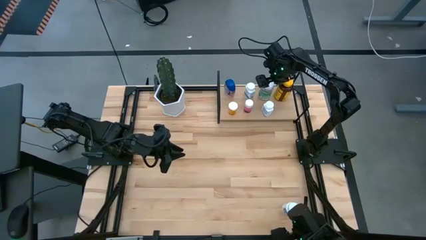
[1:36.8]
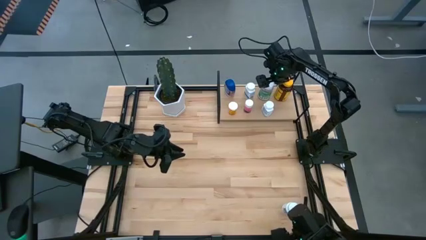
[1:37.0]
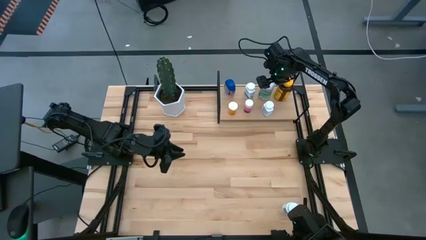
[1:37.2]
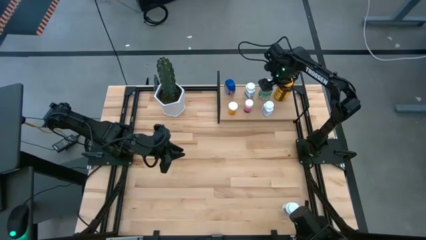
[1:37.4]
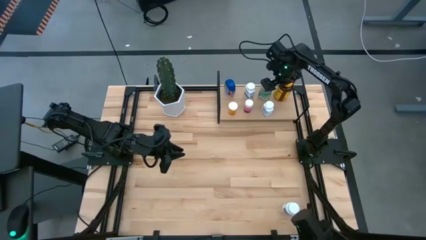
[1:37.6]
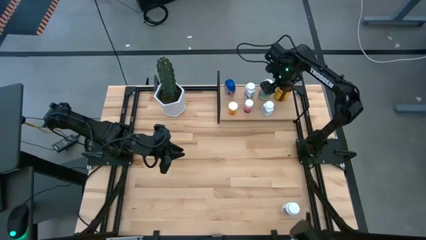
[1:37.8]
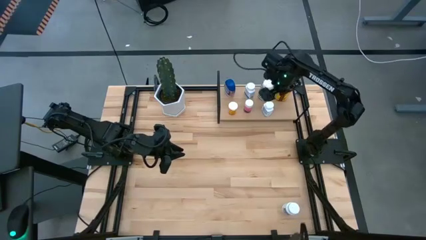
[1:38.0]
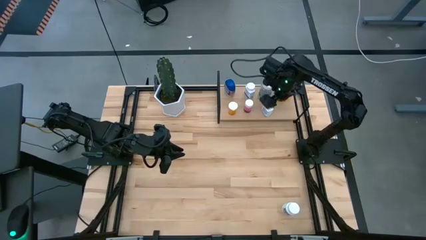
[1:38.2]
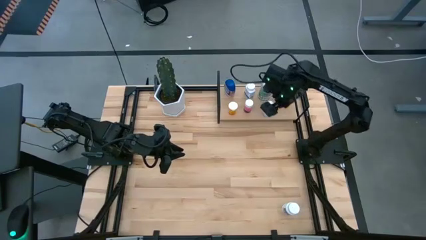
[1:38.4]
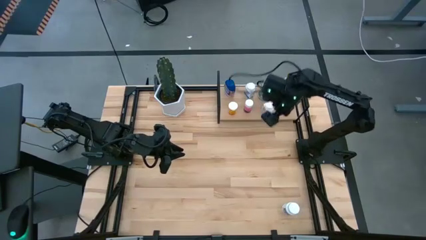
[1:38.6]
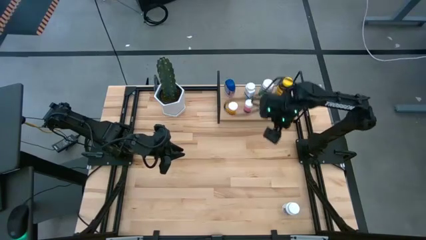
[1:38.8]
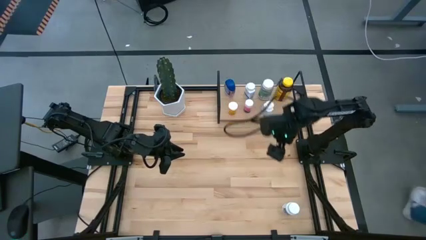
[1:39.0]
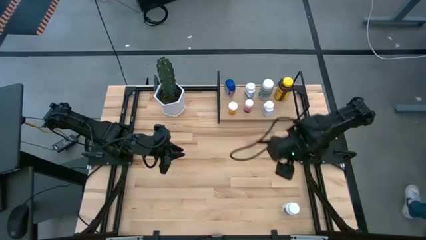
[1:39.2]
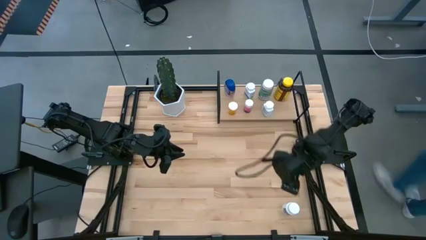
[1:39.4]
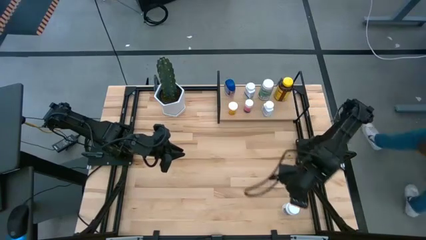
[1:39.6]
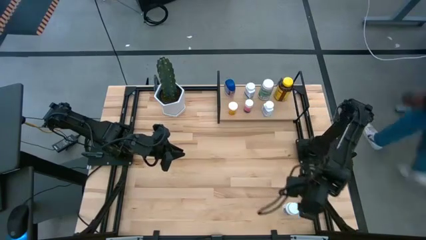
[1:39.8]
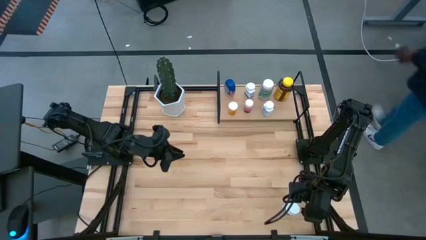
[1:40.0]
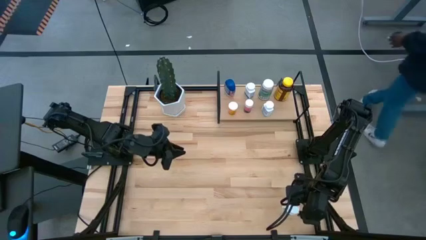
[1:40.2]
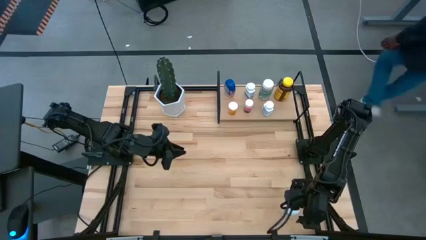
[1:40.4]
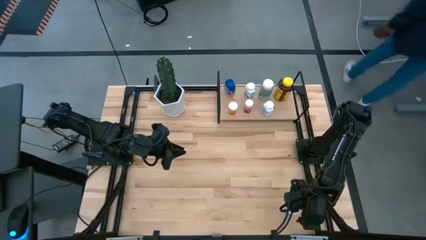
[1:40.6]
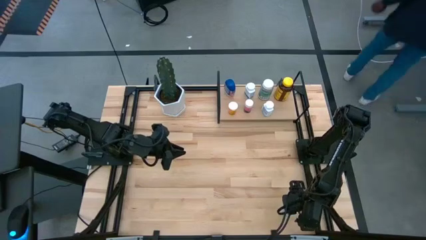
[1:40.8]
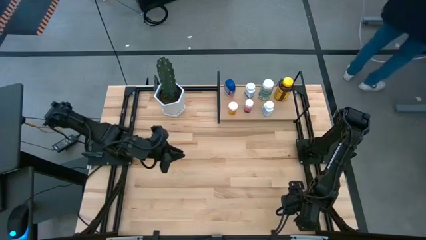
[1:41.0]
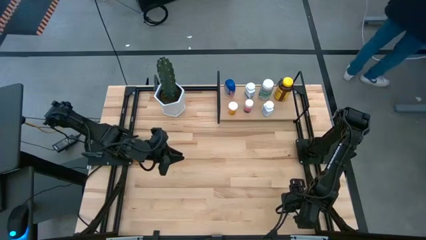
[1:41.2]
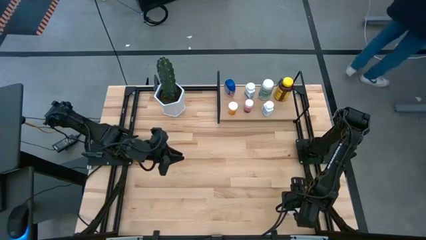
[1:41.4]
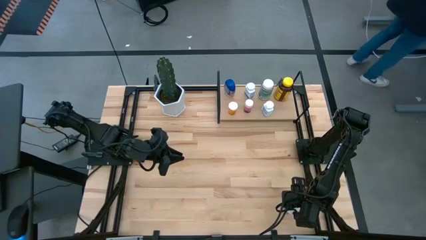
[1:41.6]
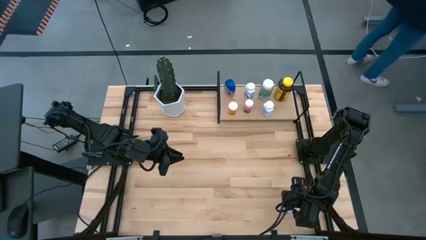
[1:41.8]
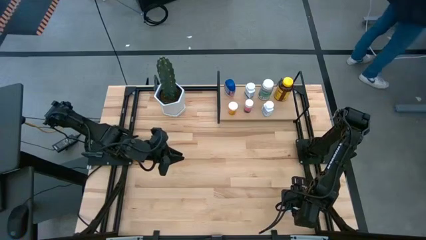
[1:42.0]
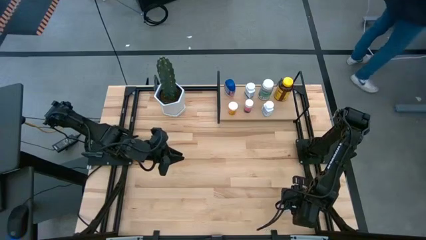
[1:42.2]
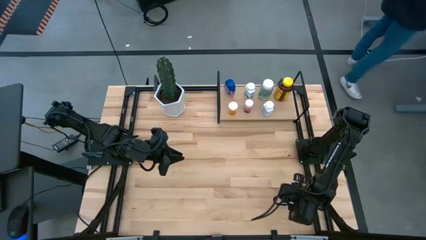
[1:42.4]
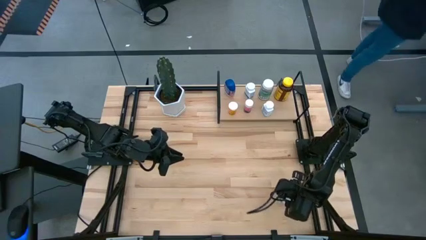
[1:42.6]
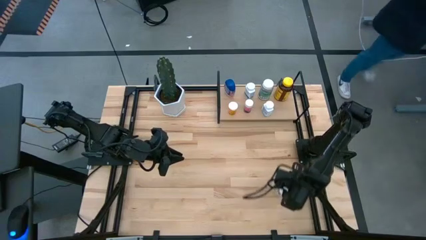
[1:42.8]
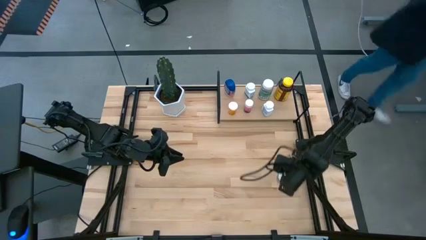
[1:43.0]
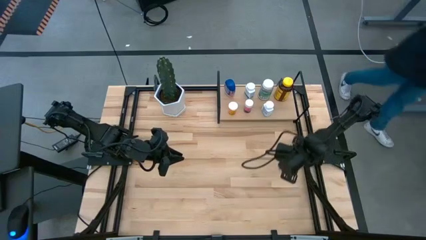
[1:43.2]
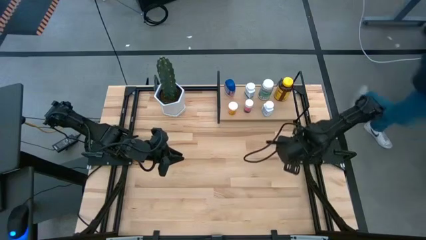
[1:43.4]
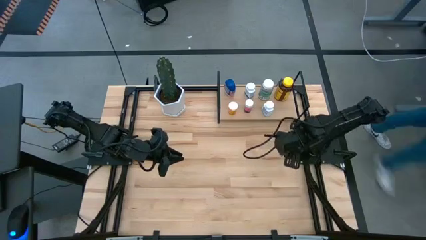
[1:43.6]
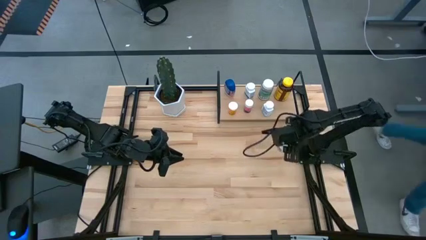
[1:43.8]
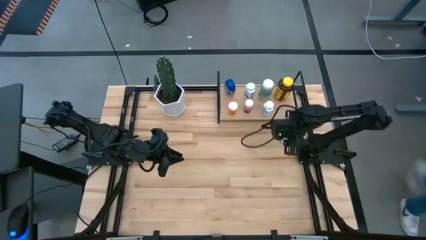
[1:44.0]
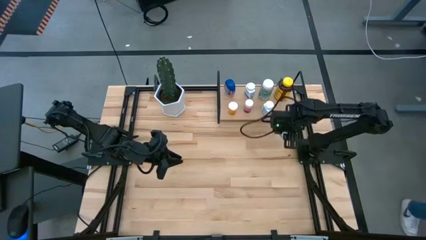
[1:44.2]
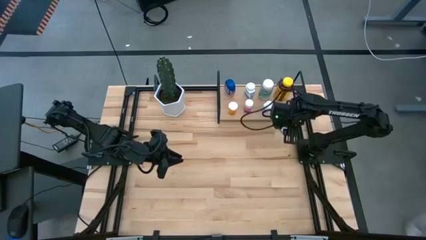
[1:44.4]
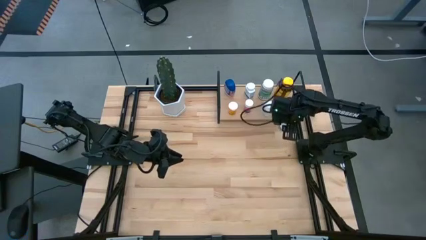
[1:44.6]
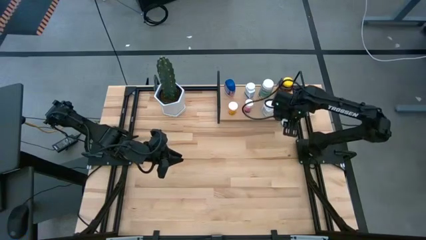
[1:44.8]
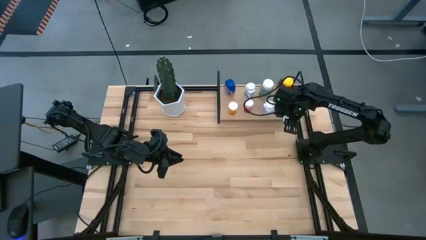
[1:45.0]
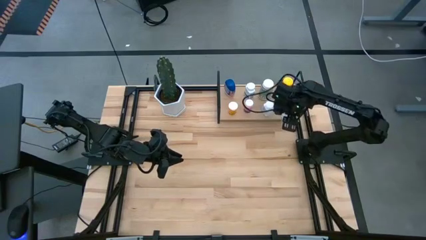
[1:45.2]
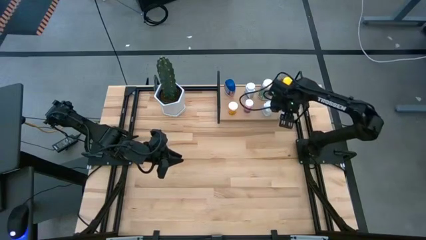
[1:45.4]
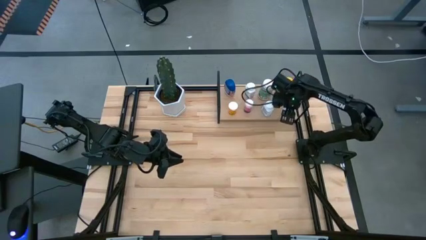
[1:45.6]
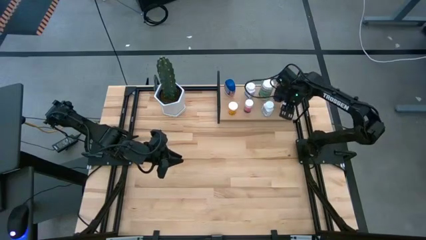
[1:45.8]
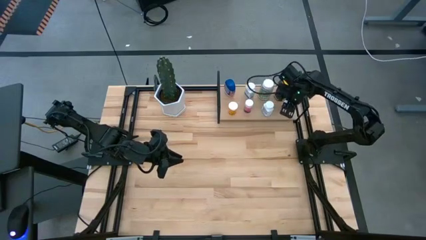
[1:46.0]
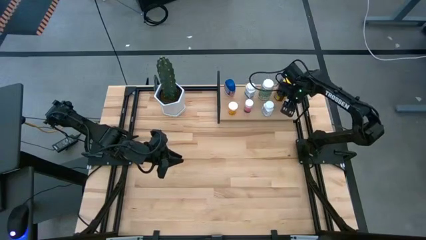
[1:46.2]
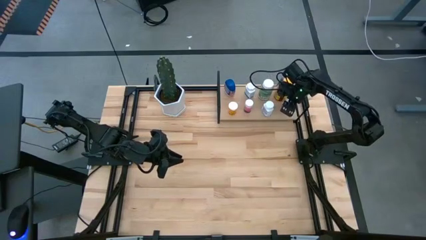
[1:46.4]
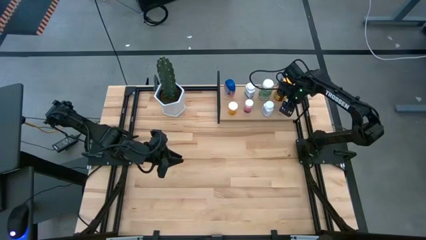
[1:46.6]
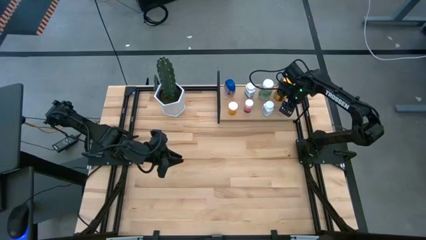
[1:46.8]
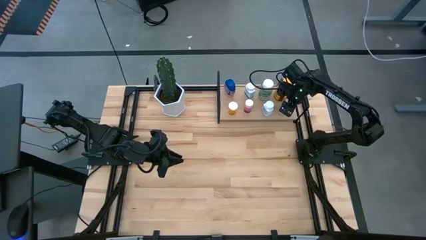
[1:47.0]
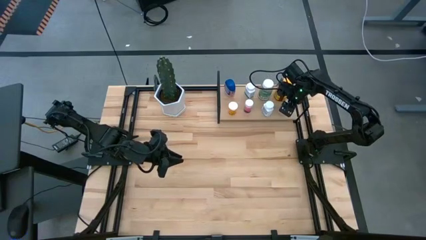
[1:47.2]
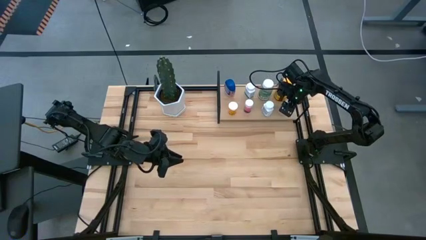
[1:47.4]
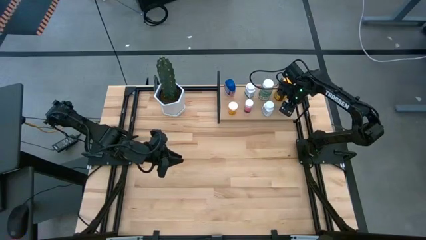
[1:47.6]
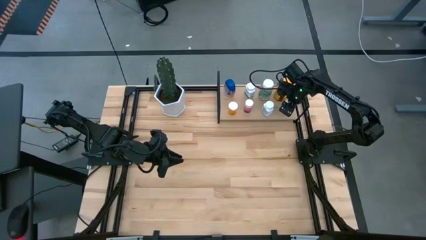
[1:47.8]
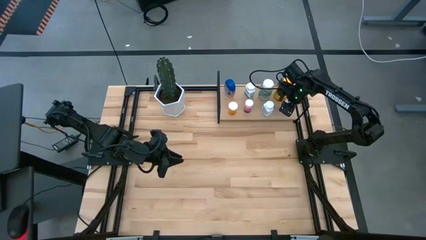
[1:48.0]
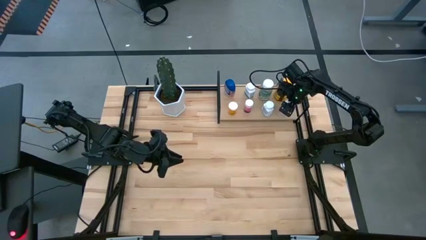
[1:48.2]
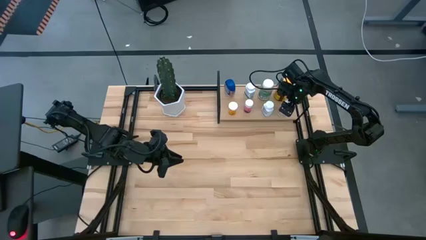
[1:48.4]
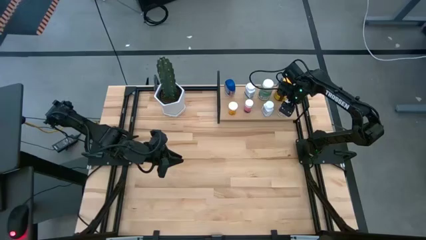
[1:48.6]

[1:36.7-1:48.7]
Task: Pick and place medicine bottles onto shelf by color
Put the white green pill bottle on the shelf

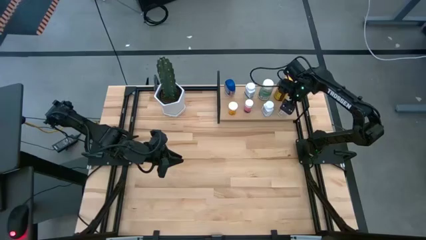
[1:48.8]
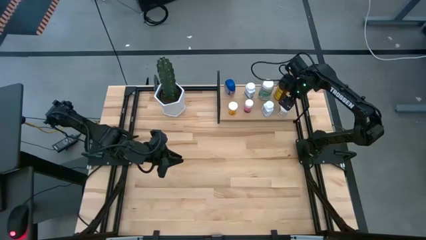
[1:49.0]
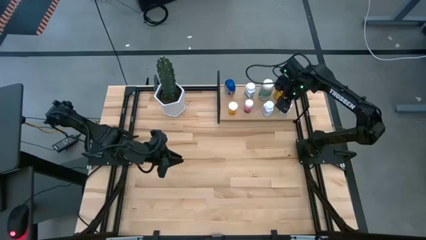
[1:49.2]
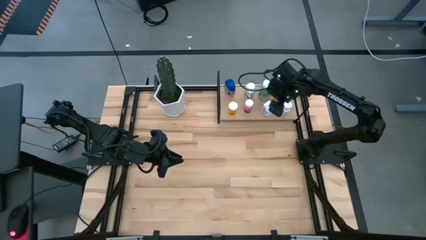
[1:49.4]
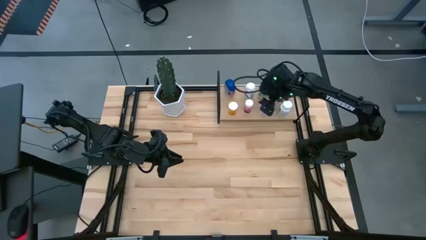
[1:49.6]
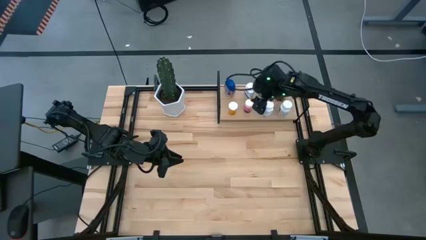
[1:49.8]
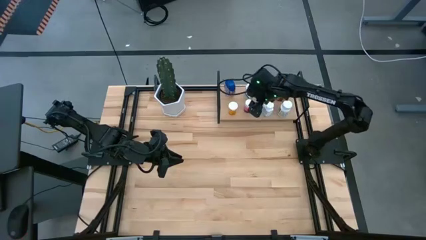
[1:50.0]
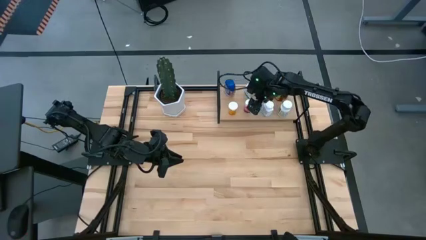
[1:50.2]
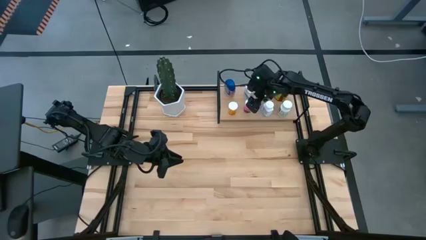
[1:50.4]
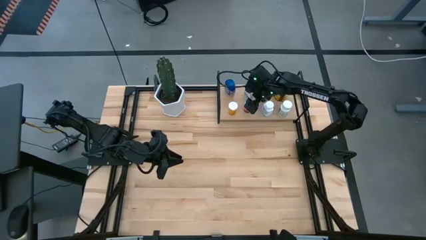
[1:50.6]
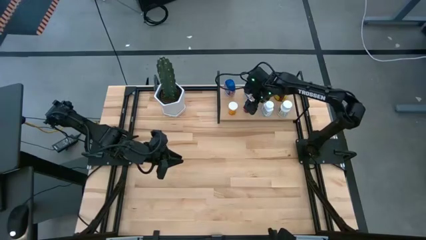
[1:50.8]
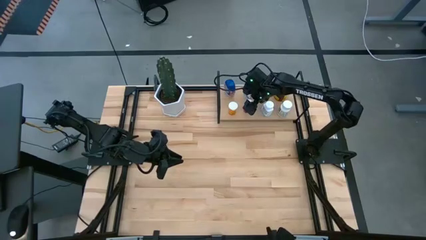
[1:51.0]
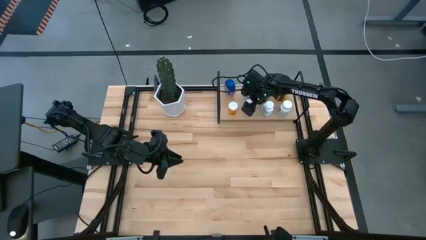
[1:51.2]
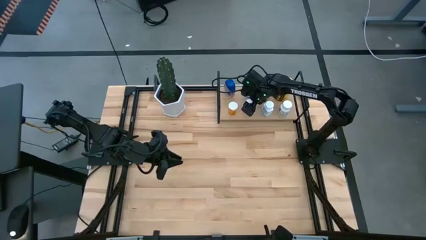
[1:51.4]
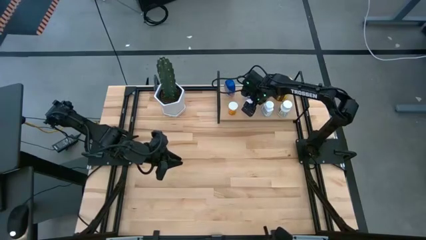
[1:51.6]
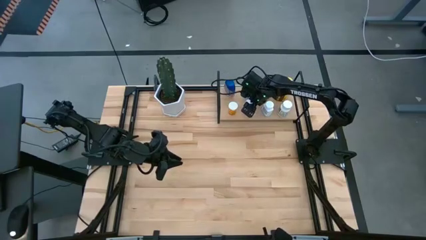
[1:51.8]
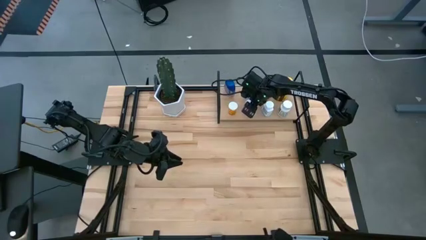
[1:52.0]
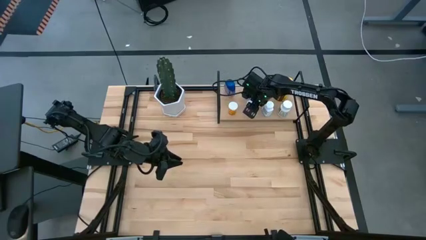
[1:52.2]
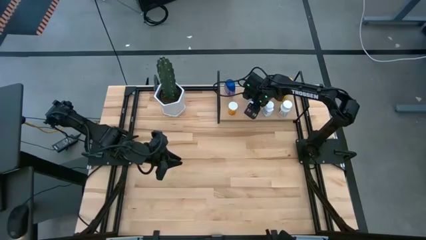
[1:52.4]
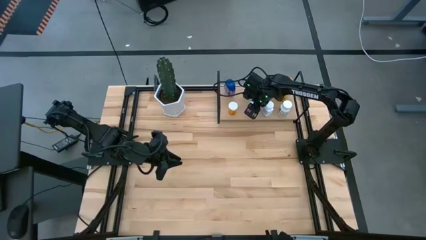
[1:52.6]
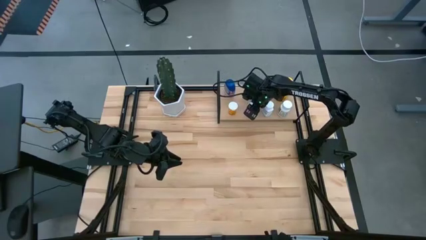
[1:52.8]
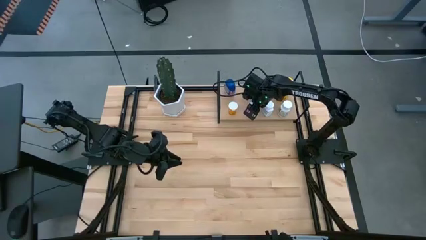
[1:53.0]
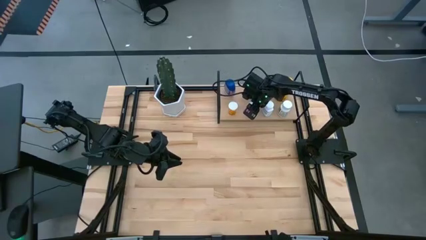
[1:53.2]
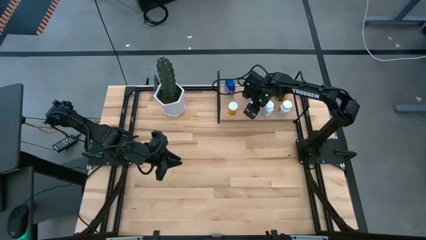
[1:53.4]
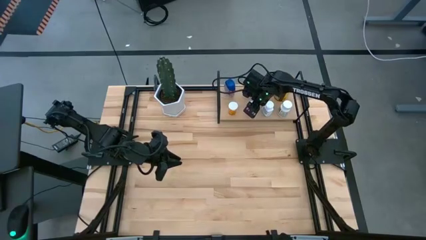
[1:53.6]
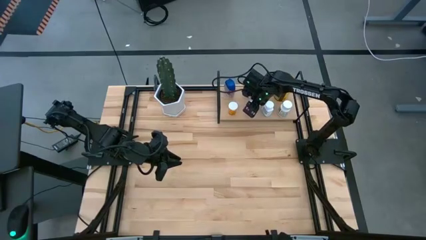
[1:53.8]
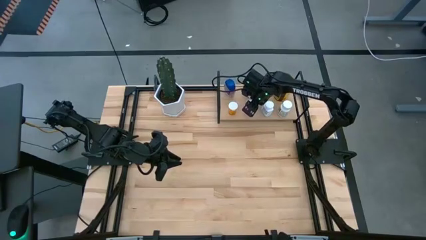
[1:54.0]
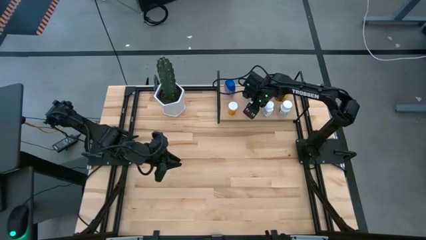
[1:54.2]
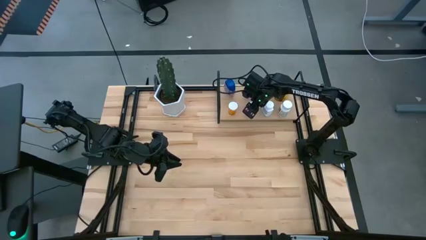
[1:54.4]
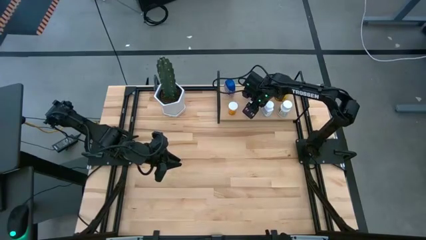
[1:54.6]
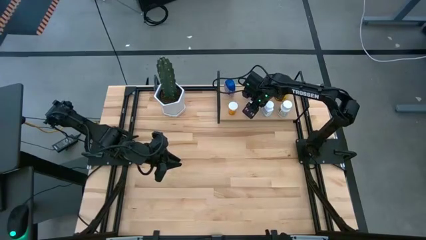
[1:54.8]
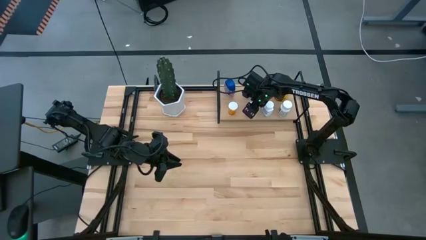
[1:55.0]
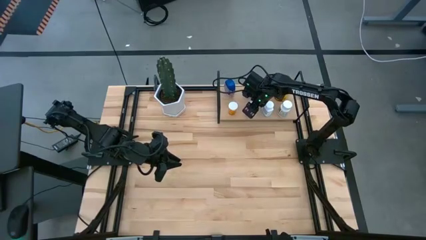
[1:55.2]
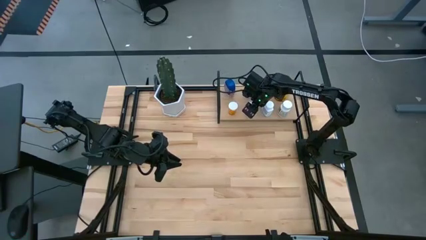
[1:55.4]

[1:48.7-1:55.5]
Adjust the pink pill bottle on the shelf
